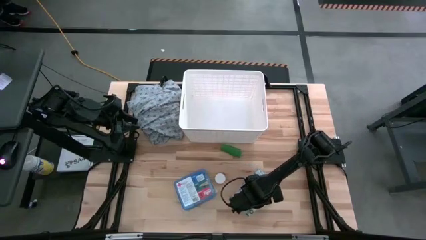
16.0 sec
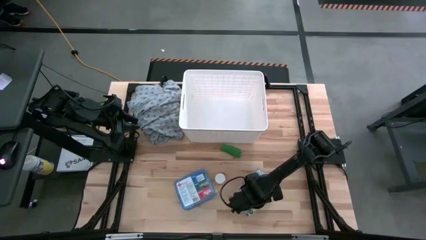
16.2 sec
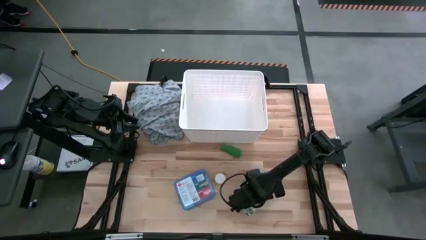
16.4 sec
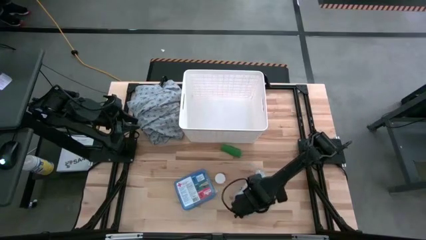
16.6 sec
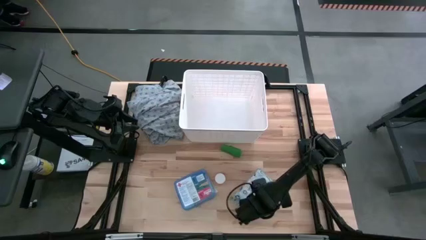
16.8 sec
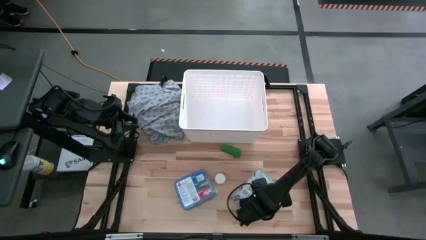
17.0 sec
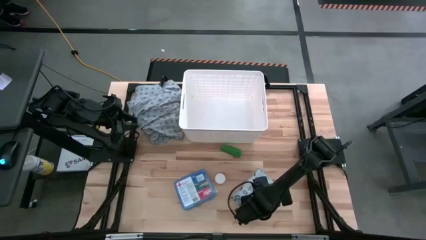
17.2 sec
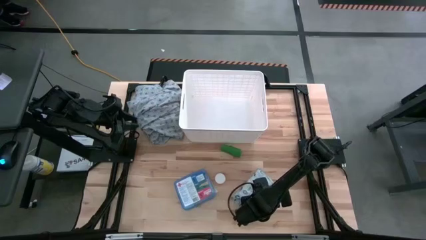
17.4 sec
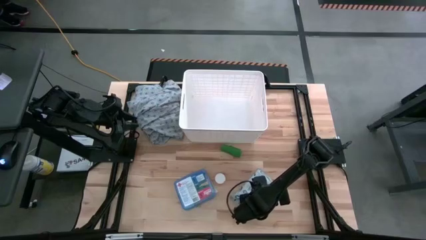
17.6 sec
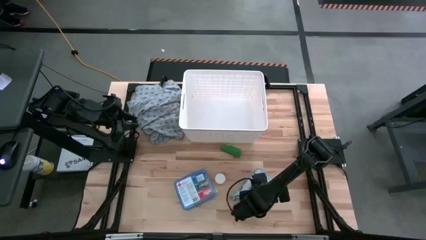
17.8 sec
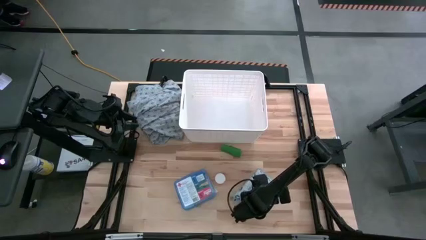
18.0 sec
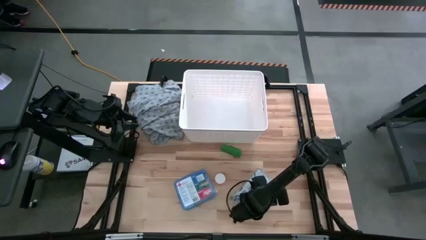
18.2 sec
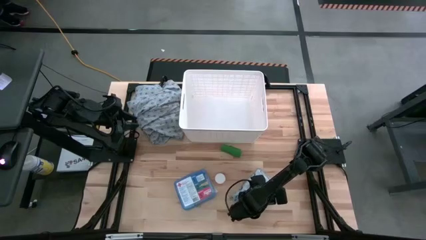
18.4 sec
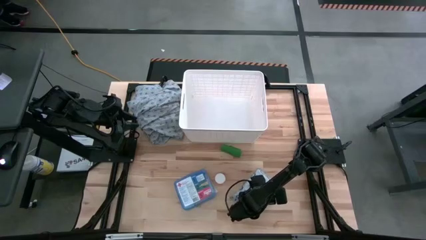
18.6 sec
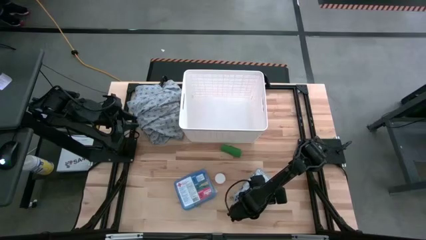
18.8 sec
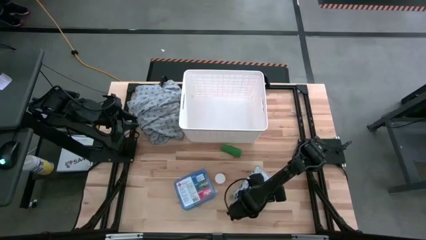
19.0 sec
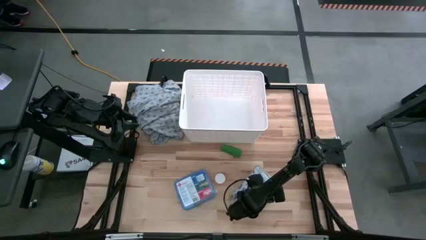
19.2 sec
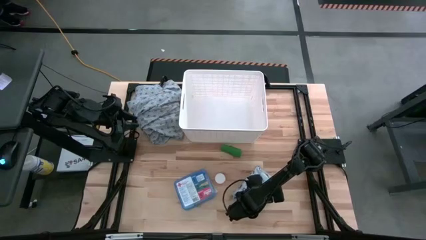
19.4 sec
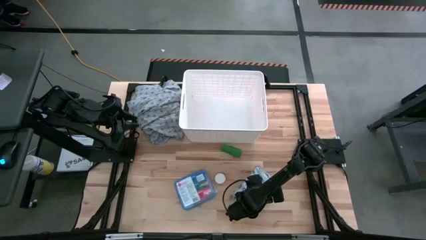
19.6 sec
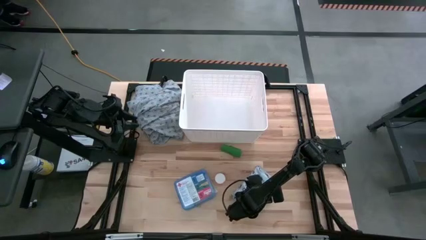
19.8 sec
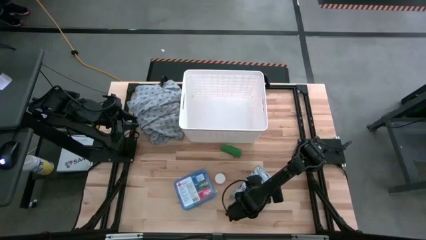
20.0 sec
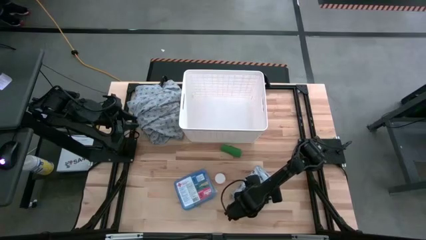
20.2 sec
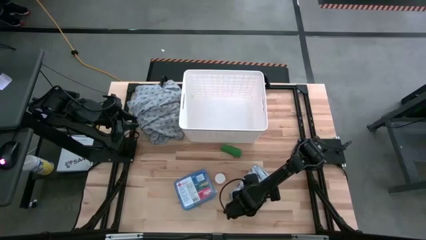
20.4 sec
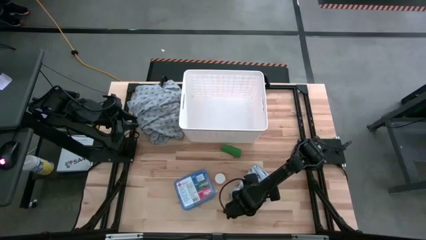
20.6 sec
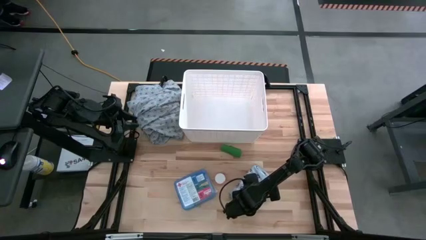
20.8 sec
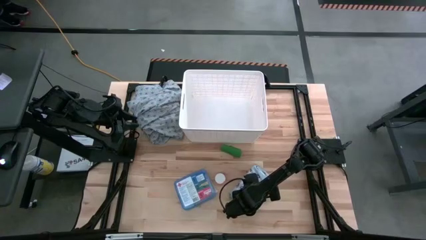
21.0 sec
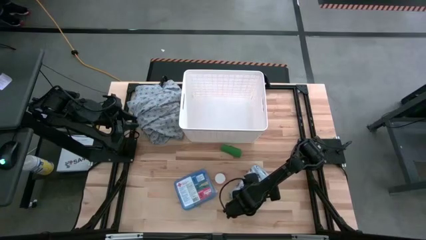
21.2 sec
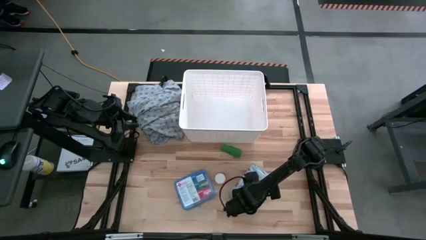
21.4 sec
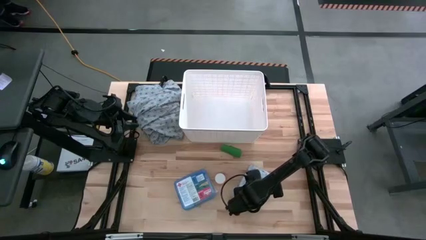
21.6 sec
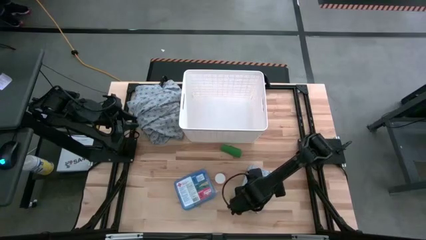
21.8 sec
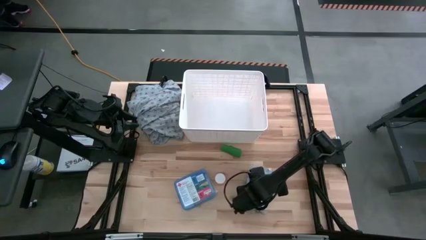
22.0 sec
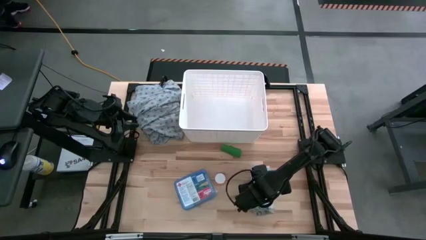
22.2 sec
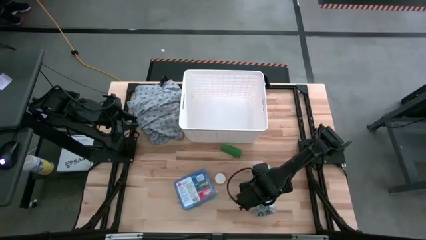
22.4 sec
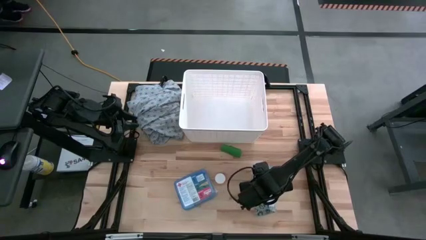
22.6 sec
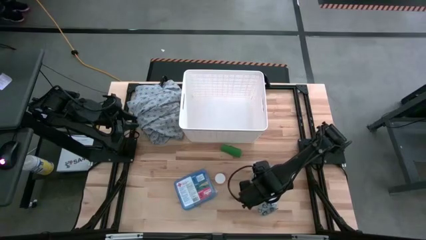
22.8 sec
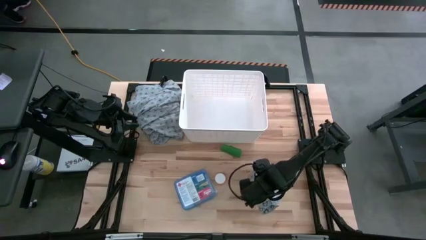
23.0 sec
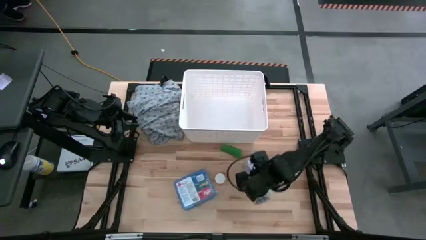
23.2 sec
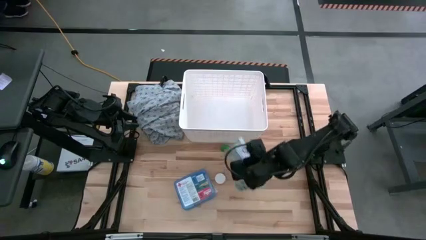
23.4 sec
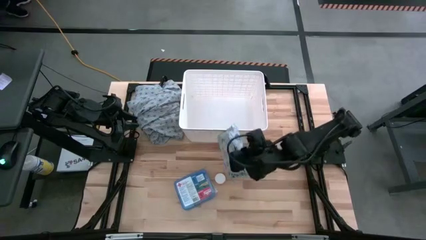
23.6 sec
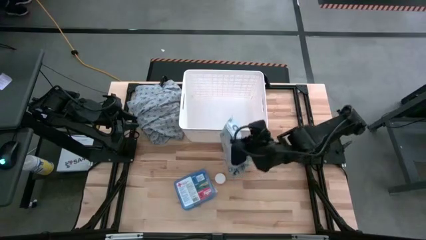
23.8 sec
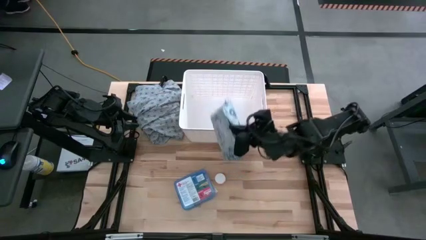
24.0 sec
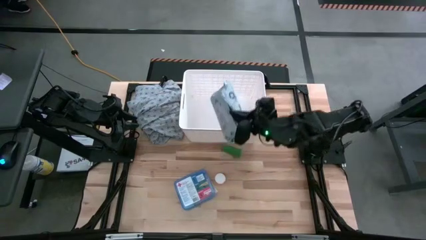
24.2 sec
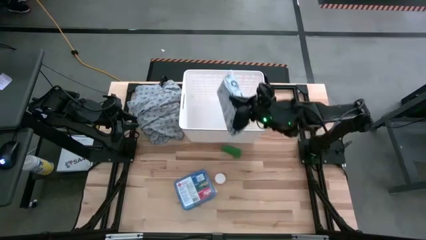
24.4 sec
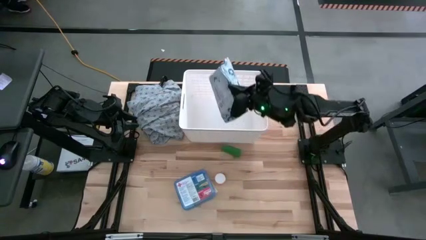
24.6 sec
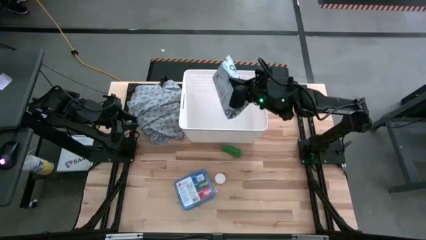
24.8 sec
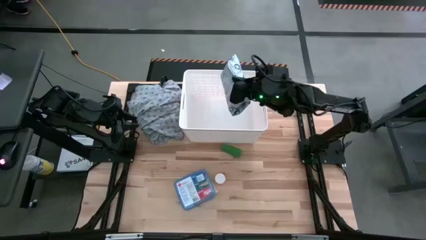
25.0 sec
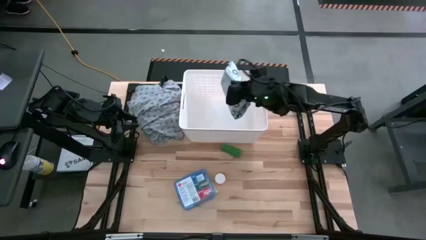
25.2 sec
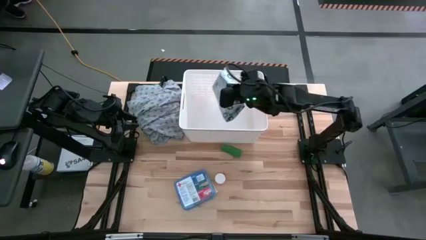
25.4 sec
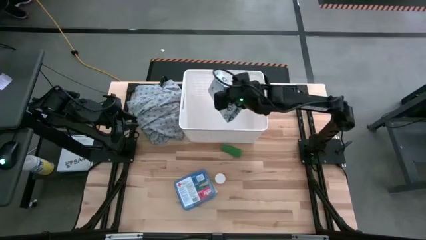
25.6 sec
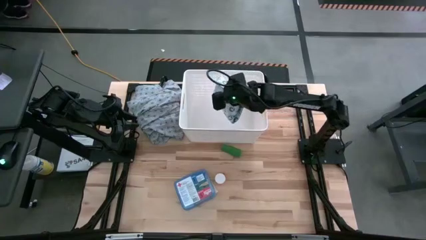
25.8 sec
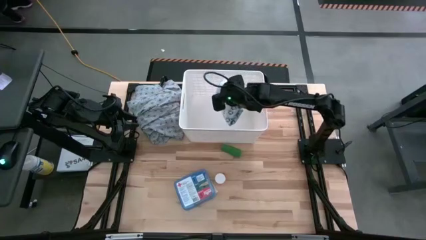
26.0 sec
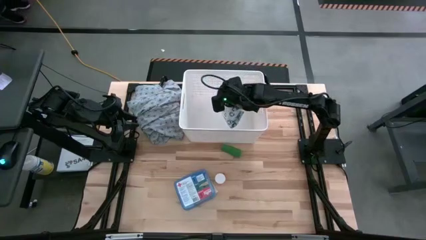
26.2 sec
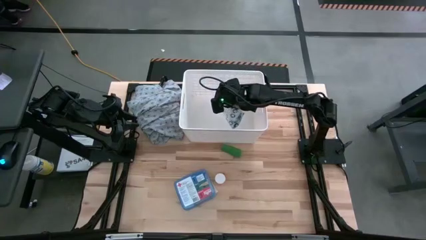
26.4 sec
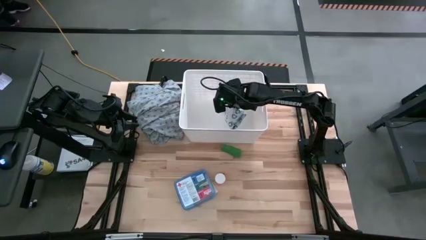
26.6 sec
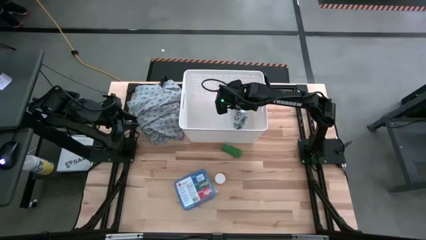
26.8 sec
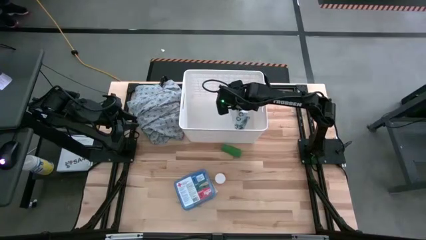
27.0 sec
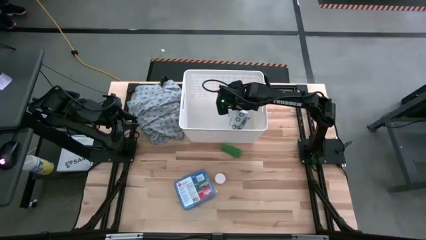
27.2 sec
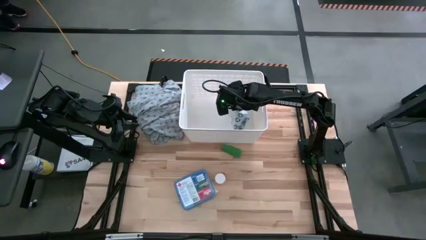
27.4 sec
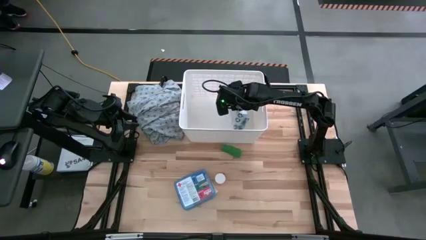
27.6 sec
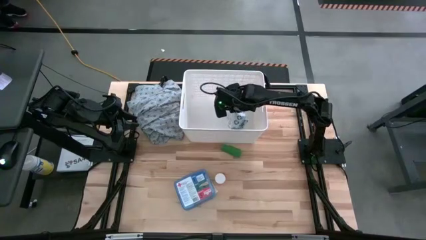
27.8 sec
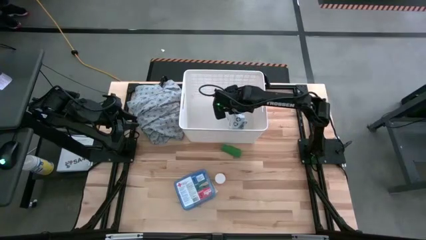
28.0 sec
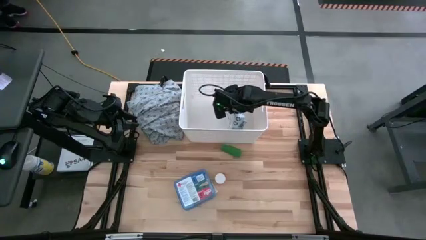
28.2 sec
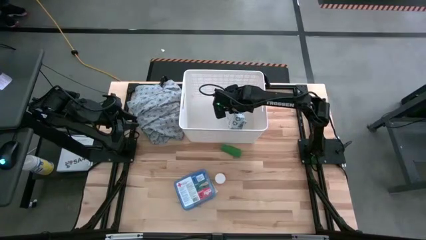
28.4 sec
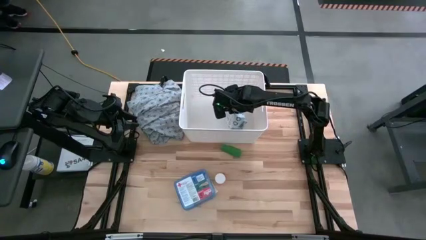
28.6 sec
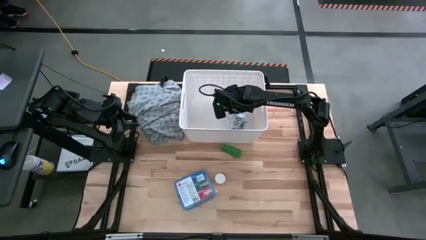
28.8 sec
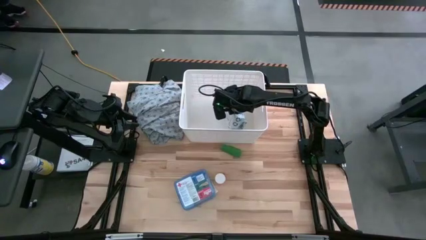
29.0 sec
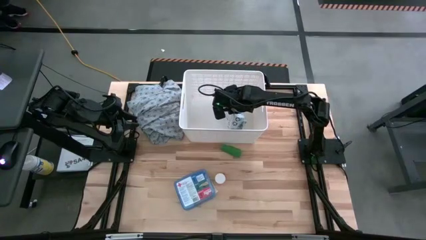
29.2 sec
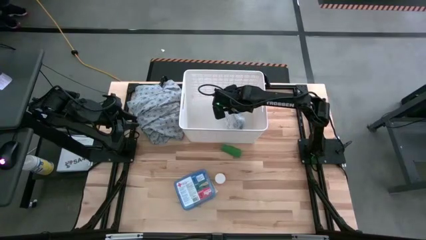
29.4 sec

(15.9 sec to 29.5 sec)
Task: Pick & place medical supplies in basket/bin
Put the blue mailer bag into the white bin

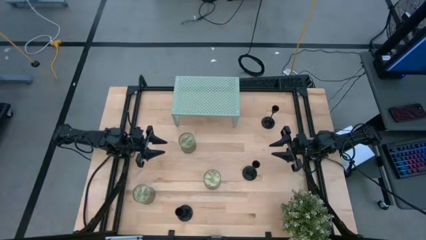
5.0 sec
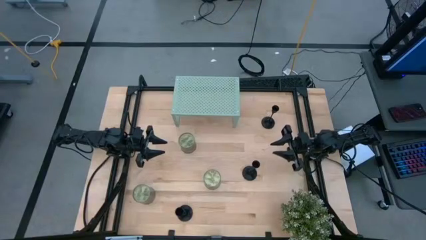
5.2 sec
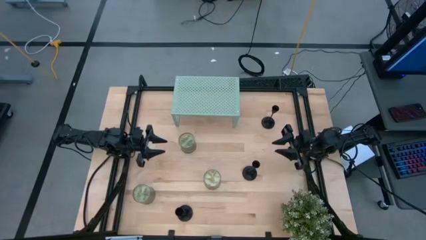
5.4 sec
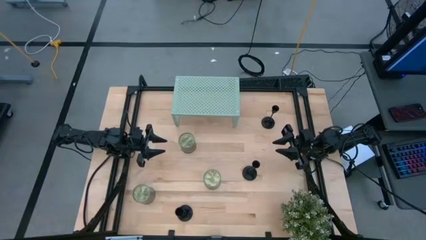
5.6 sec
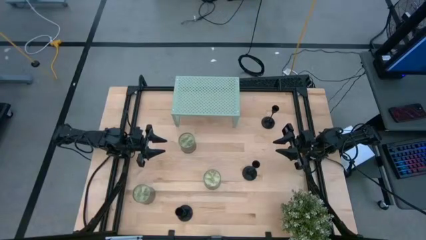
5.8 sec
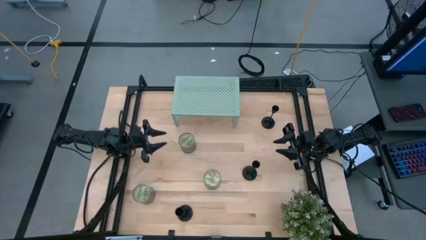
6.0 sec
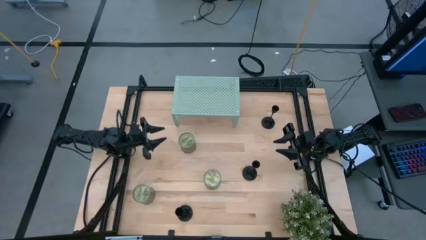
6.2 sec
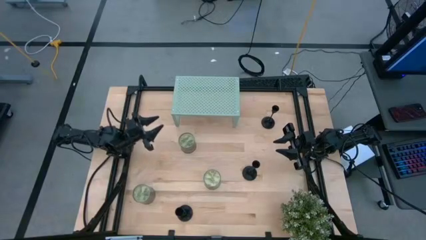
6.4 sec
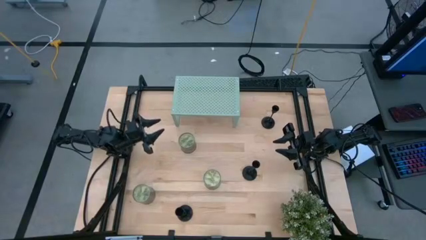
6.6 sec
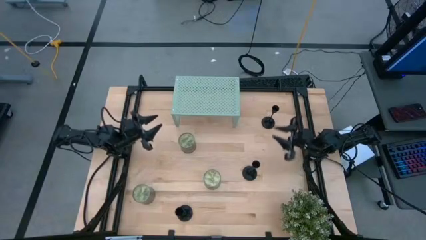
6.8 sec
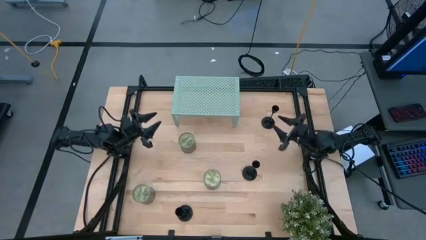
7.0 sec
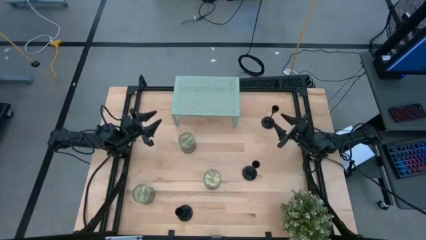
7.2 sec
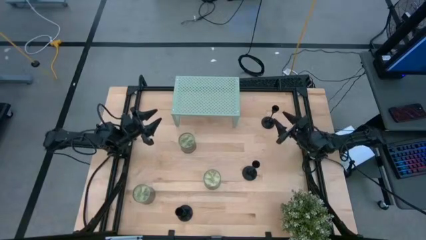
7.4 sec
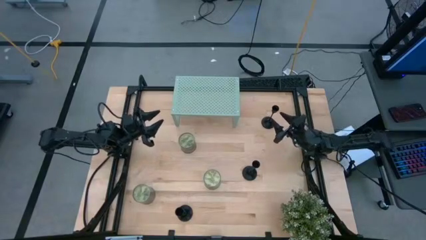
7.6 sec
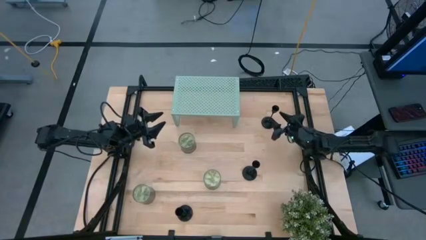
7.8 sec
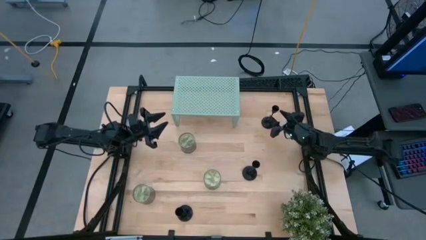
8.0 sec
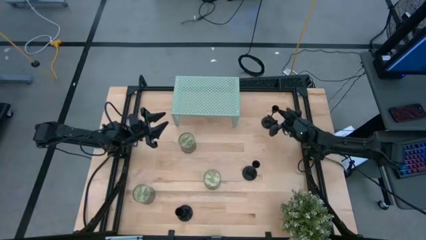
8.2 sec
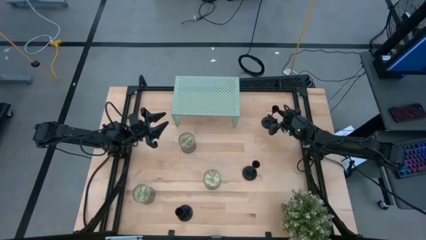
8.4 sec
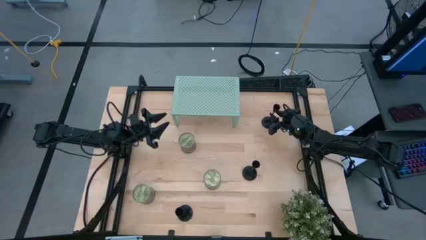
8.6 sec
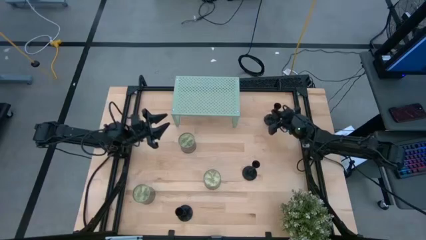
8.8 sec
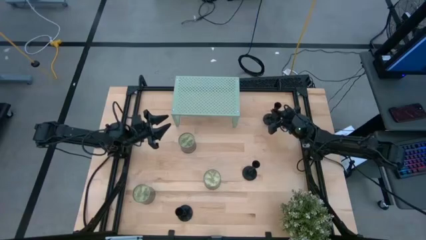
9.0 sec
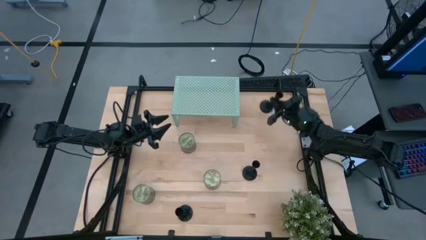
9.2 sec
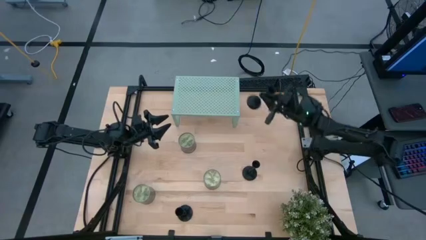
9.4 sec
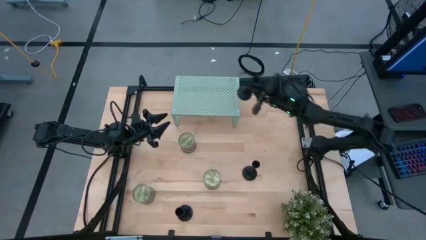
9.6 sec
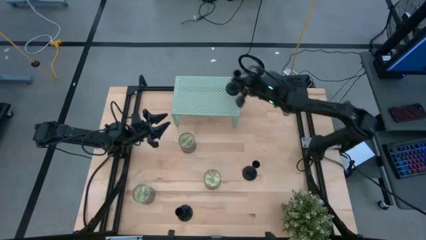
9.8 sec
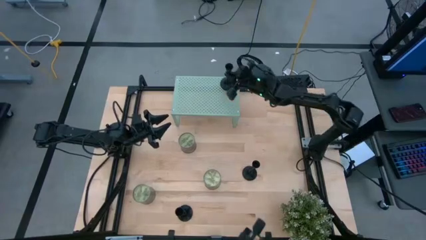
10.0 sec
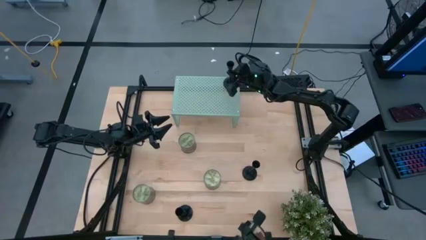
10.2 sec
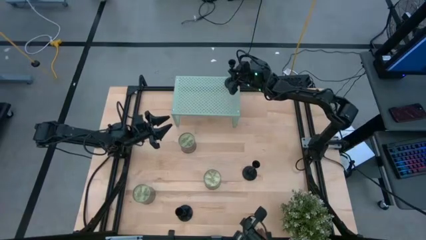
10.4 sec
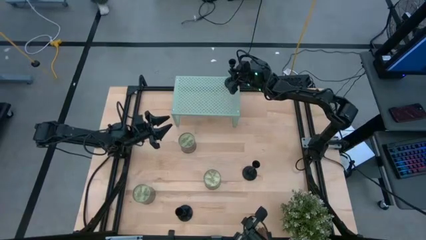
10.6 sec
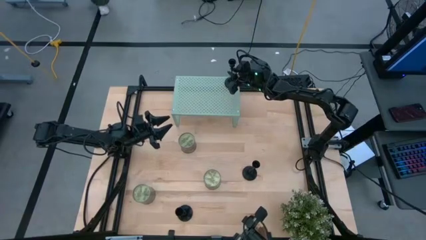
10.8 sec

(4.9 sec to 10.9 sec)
Task: Pick & Place candle stick holders
Put the top black candle holder on the shelf
